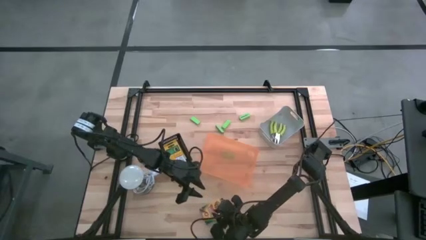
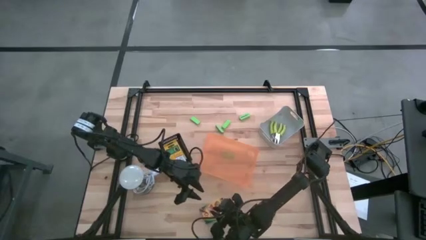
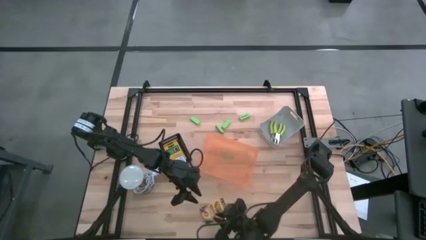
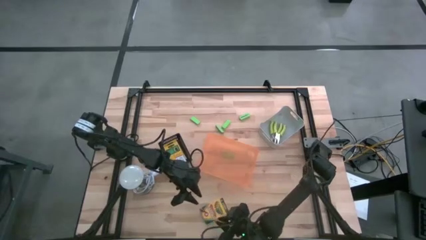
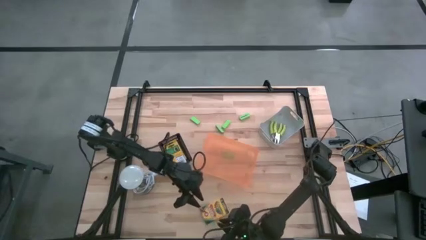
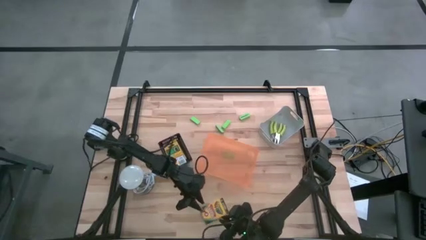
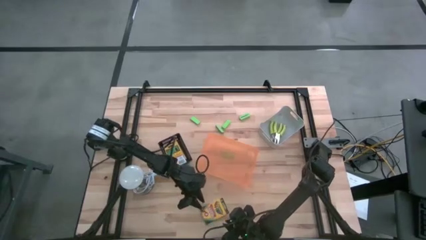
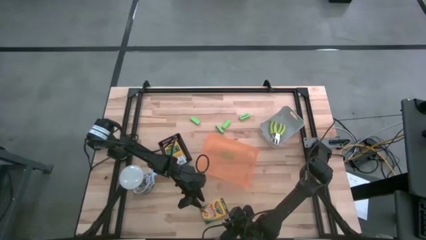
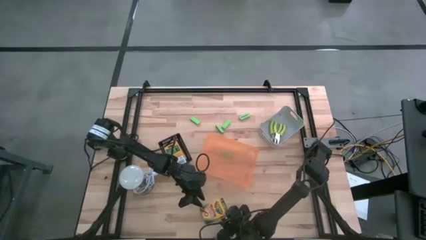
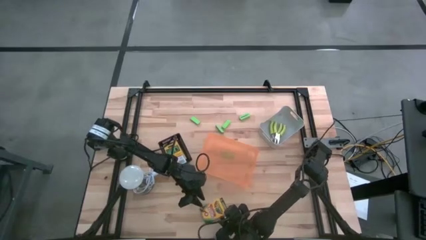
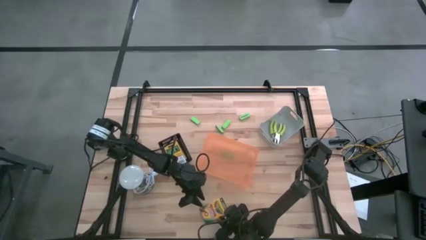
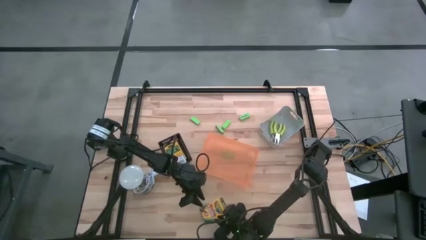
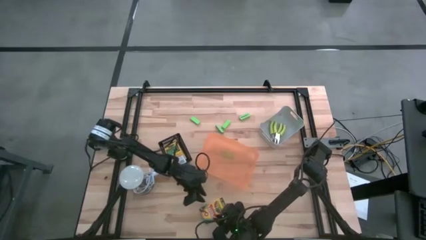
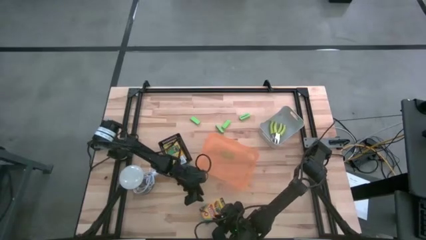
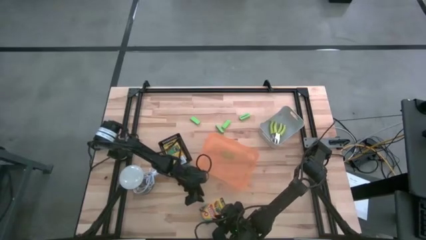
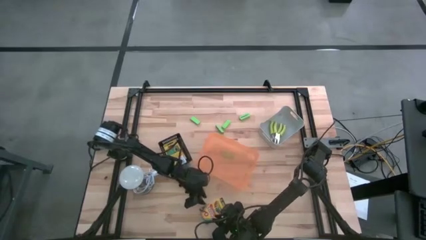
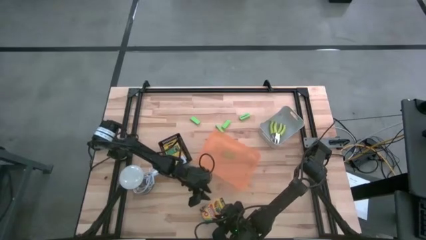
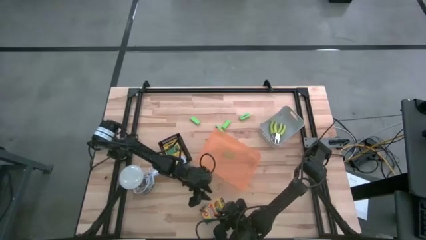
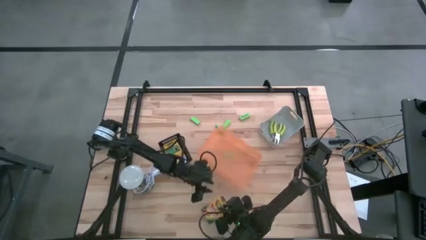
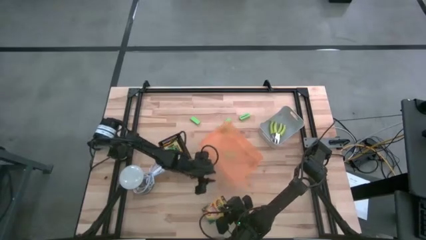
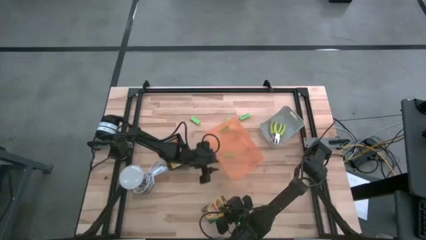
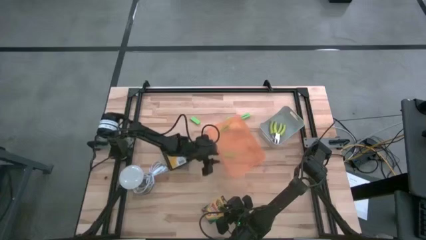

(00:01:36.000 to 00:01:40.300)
Task: Pick & Place School Supplies
Adjust the orange bin on the table

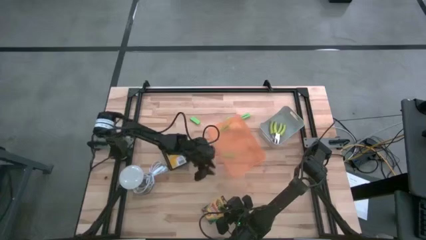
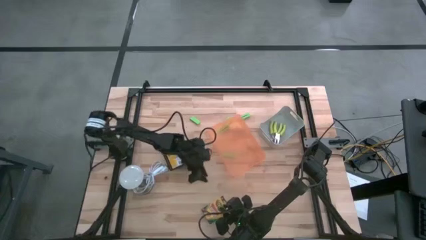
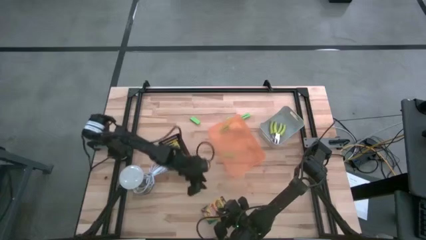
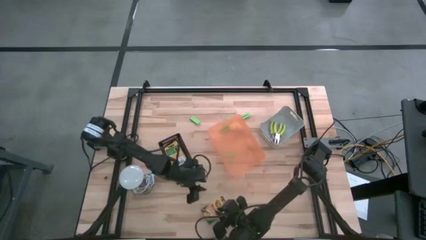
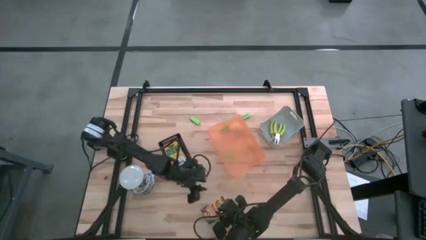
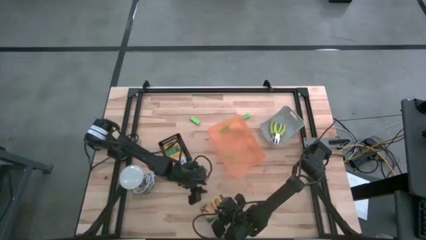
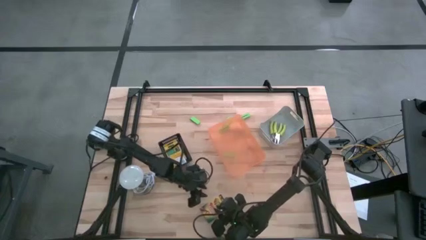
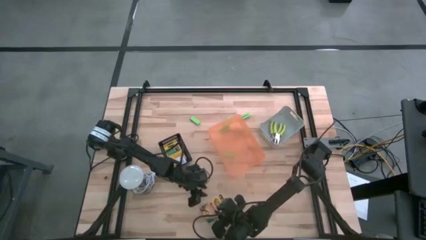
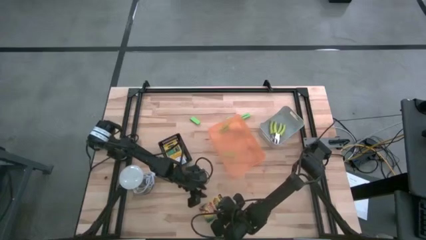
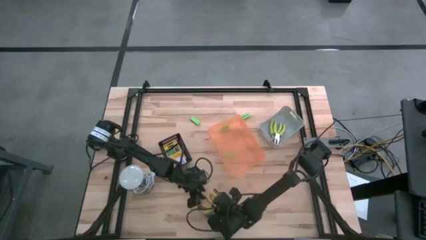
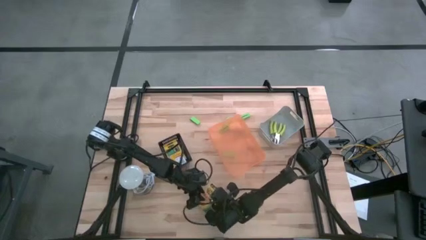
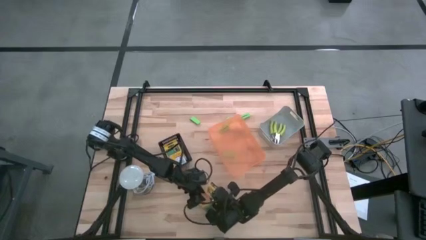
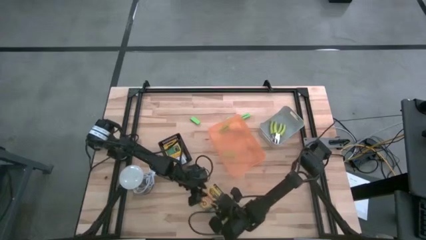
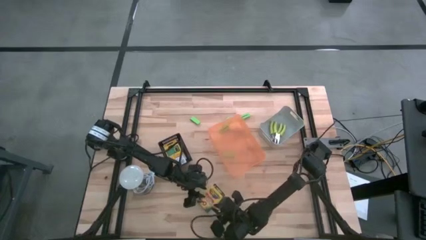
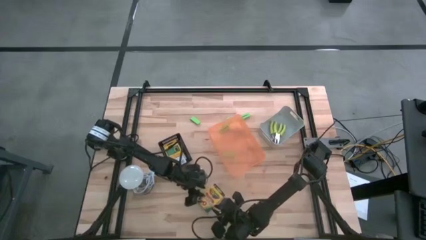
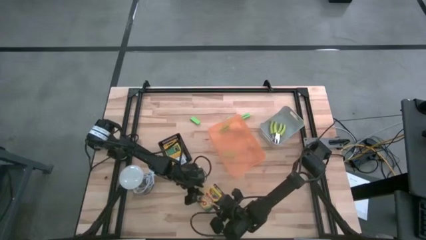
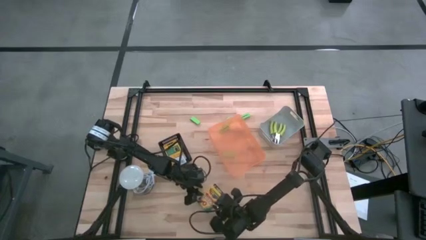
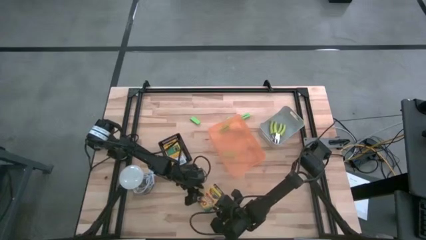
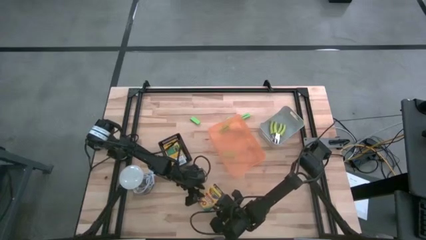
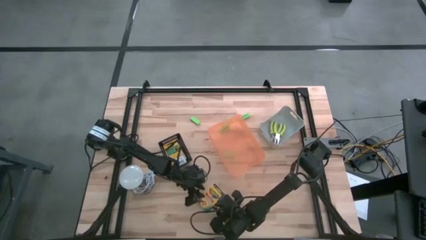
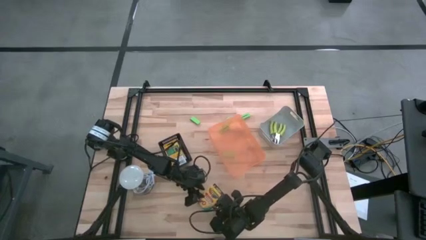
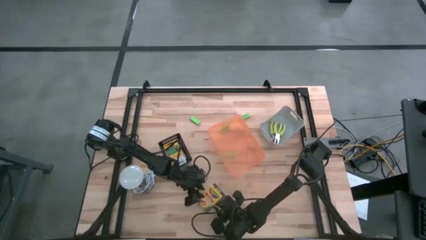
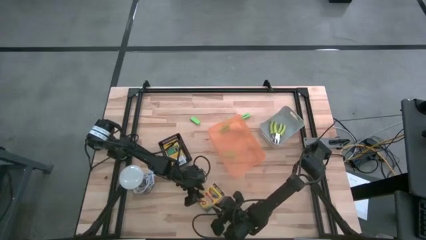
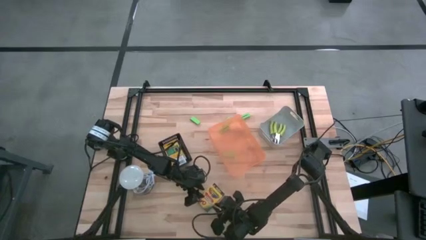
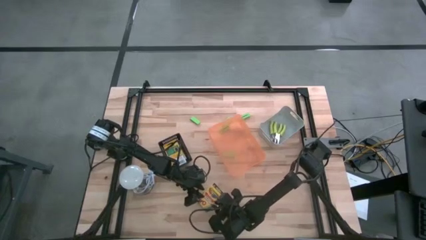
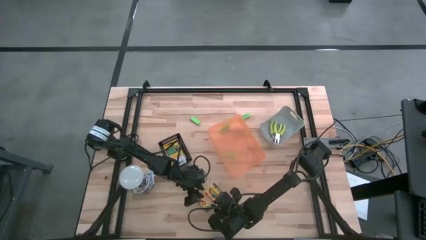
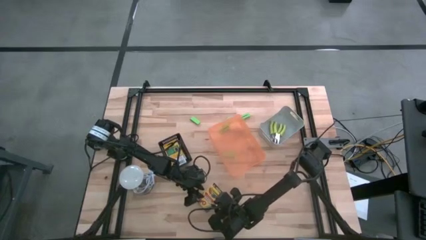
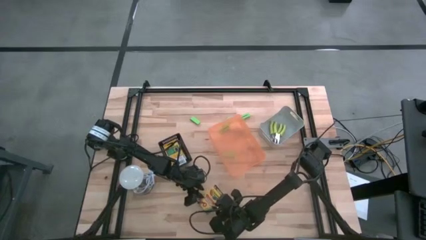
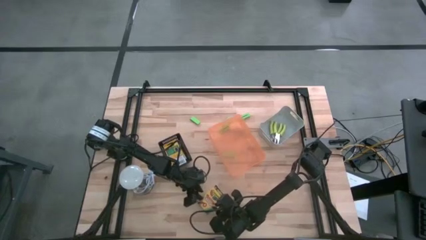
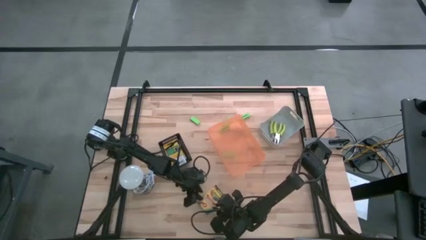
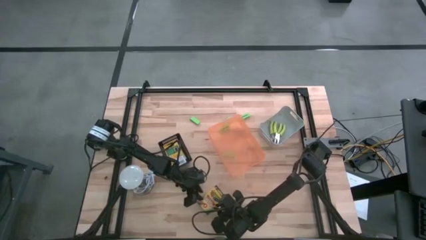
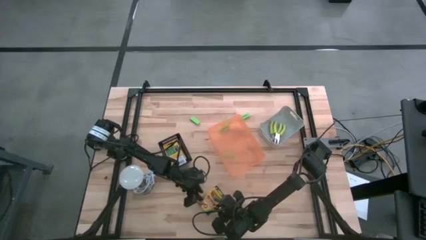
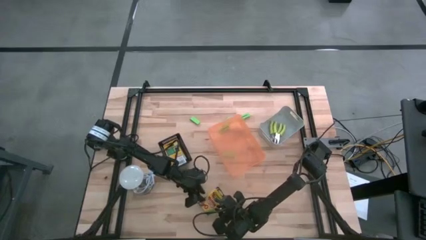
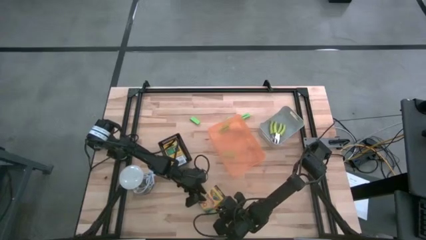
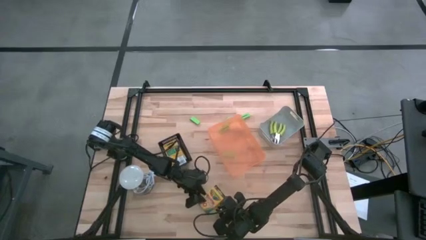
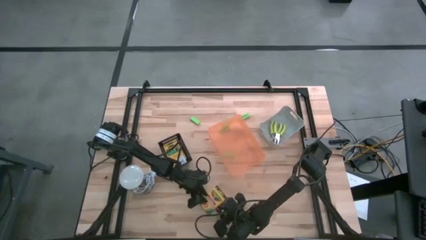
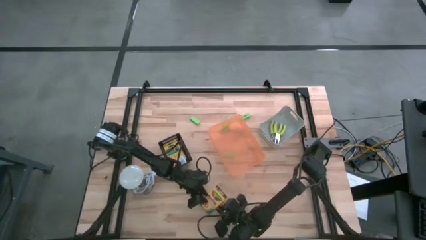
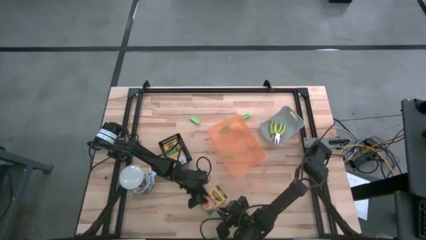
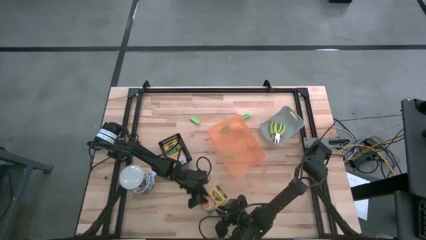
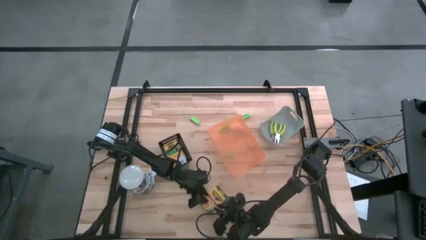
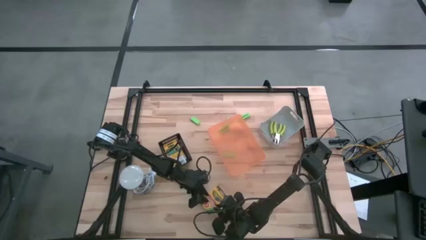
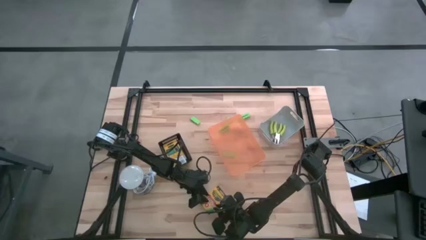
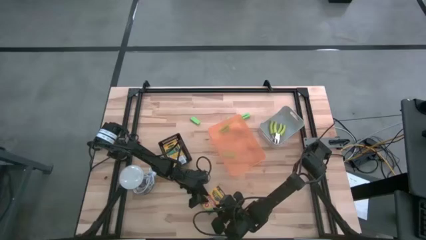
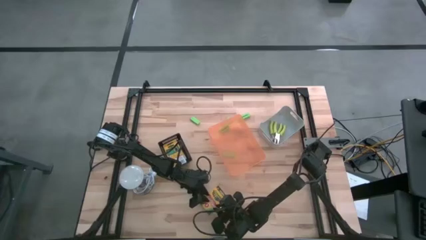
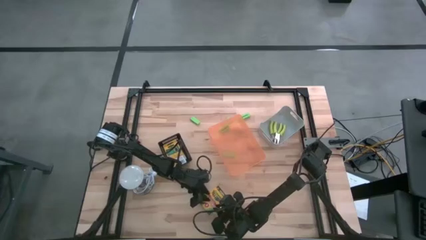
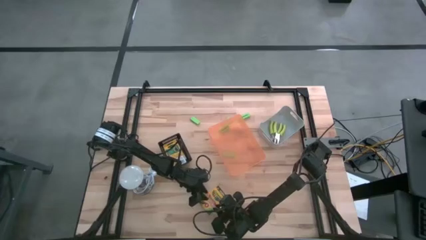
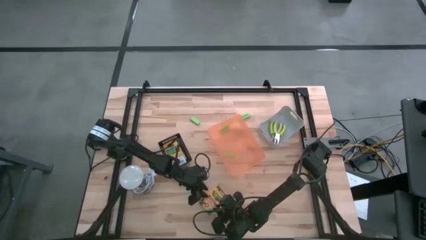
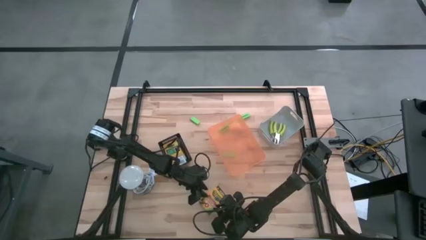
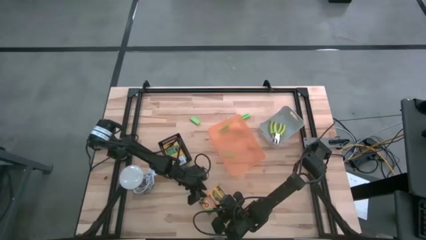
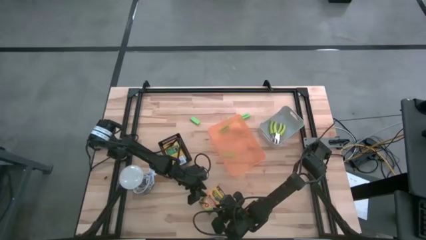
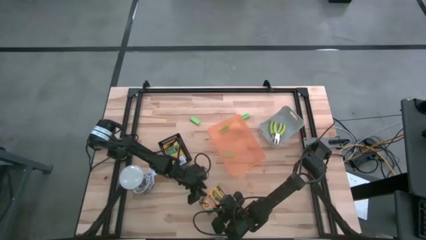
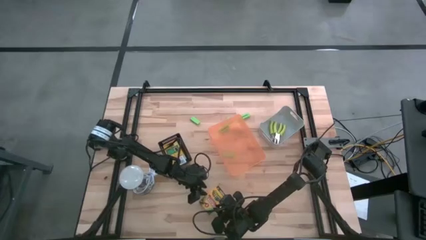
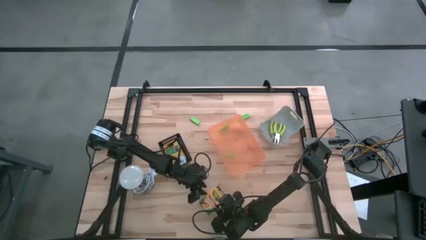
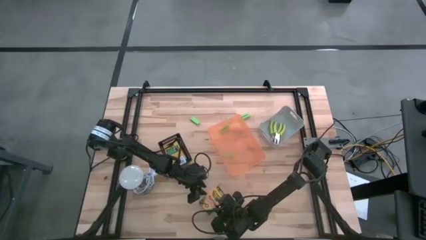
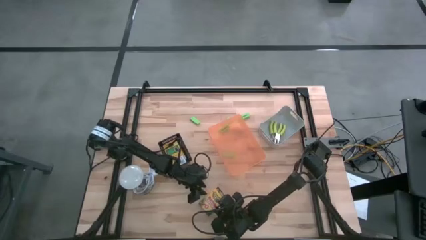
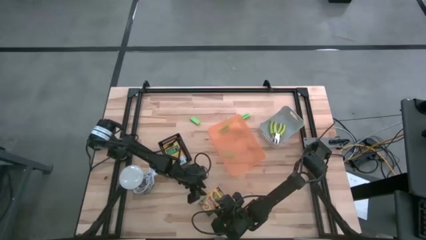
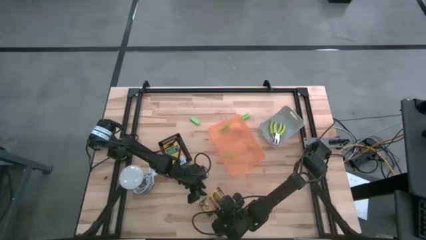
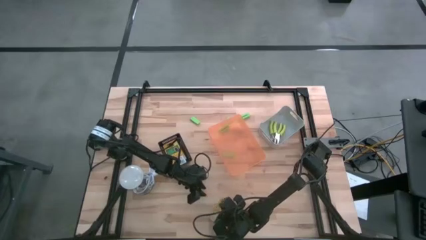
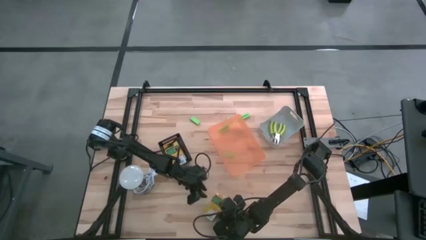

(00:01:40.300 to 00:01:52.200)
Put the yellow crayon box into the black bin
